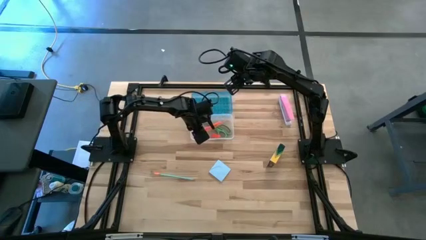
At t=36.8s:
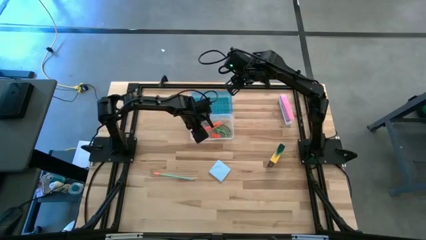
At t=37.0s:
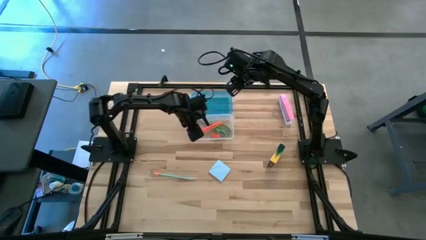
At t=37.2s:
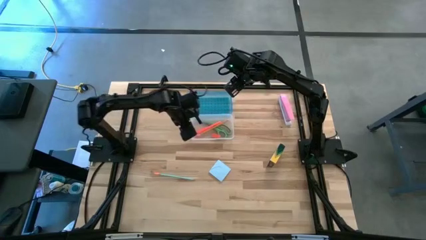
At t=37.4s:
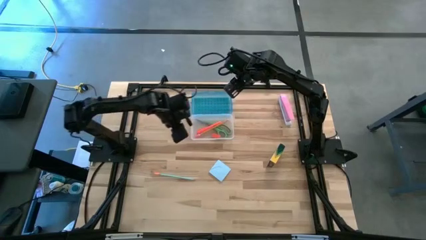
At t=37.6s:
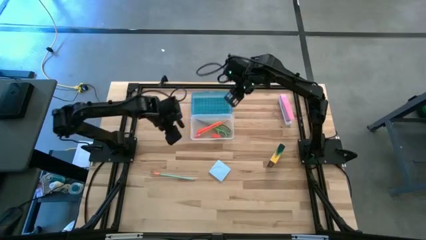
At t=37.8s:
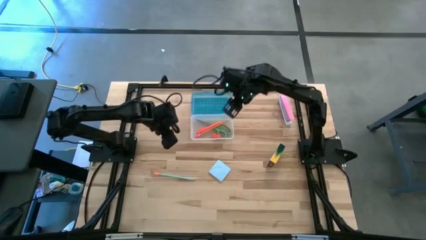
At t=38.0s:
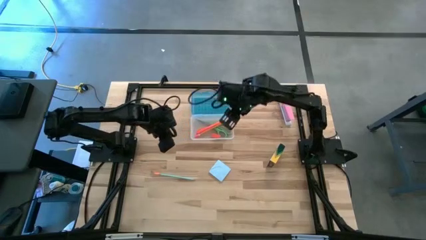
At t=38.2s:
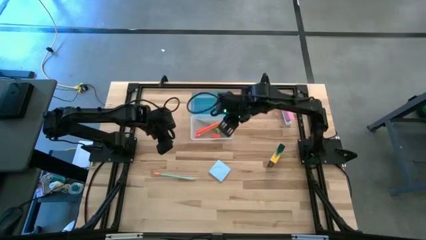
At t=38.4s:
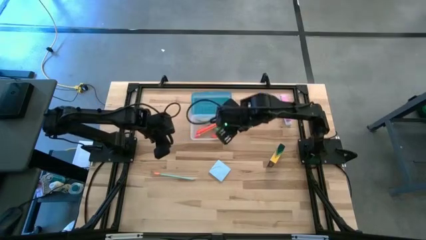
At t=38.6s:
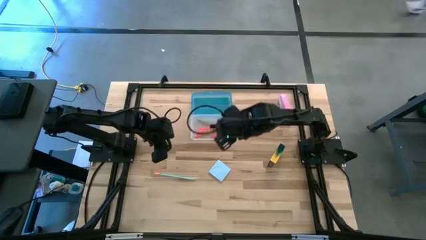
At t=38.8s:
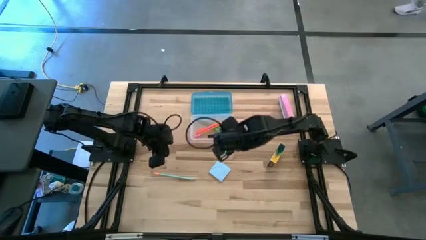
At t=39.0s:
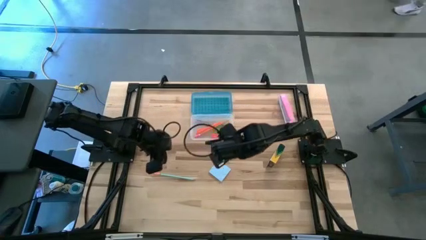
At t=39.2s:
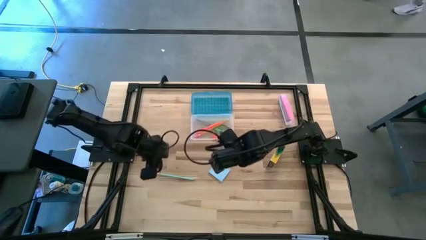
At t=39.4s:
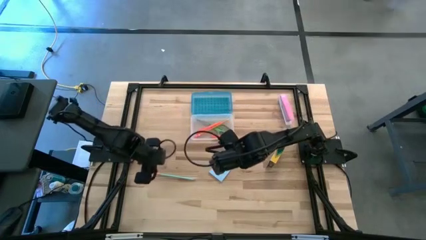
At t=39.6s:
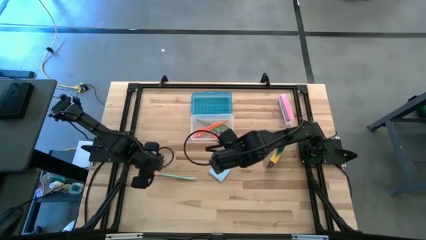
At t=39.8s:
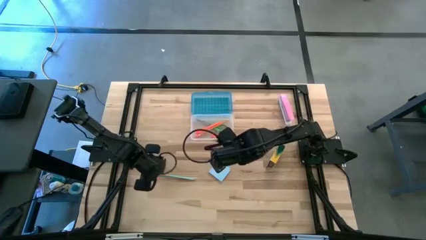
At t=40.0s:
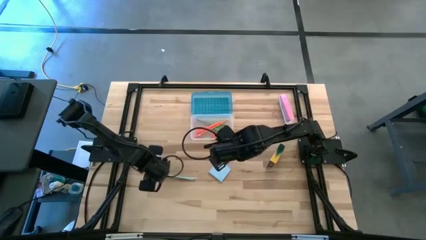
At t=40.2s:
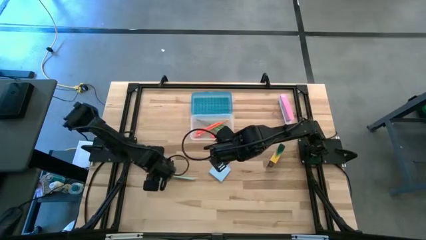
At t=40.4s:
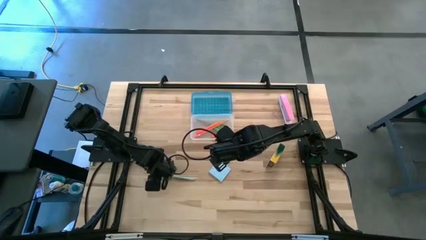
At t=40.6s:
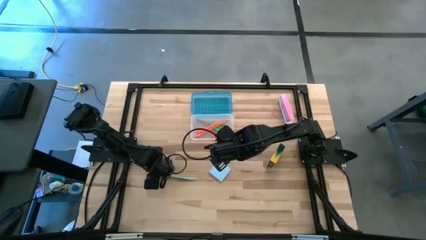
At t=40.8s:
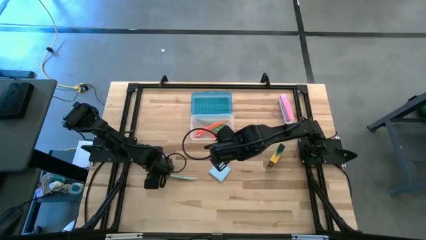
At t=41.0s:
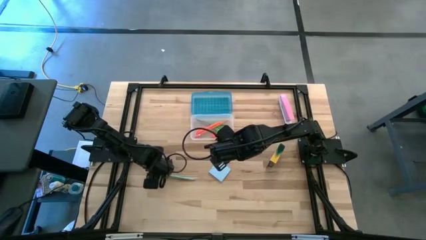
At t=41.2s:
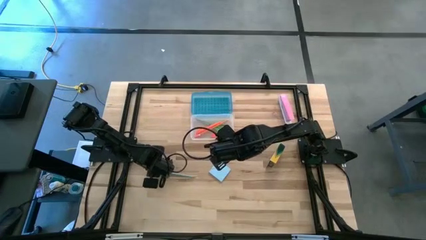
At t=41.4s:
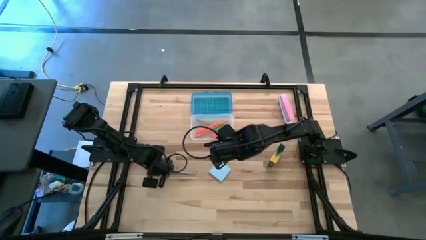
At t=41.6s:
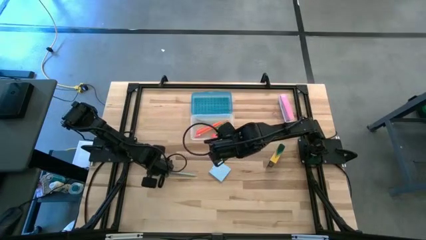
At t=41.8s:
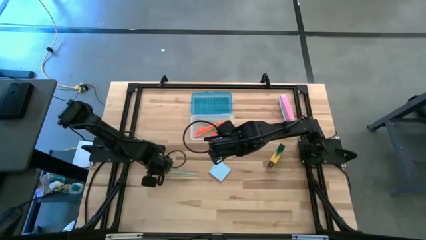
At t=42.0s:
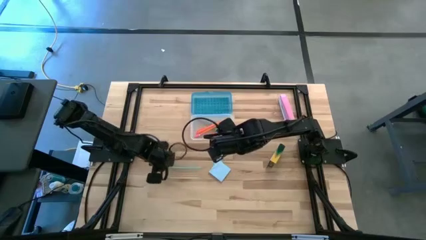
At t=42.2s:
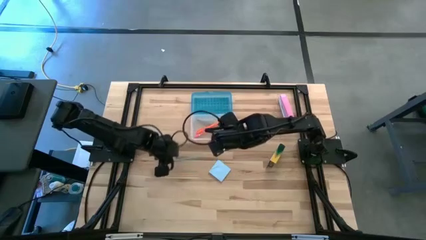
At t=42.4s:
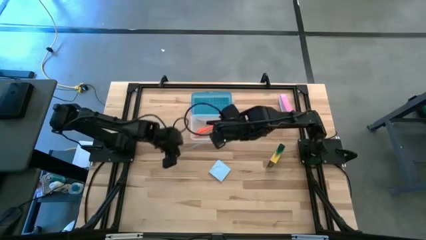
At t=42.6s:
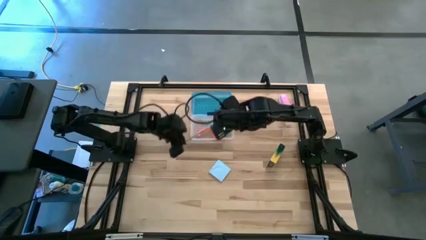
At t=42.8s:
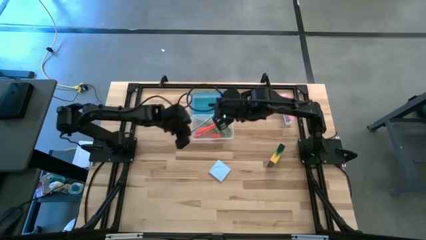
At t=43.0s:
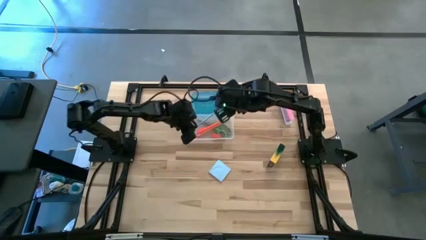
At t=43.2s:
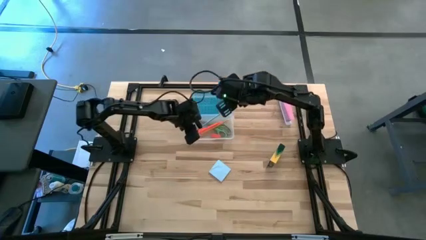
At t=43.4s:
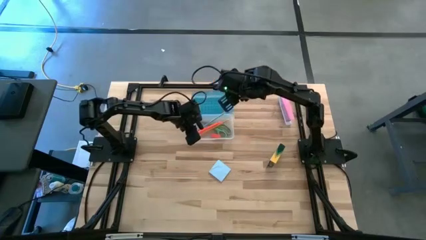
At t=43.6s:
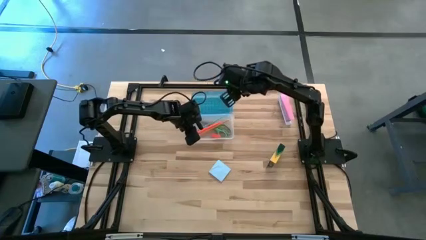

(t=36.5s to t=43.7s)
Task: Pack school essentials
Put the blue pencil into the blue supply box

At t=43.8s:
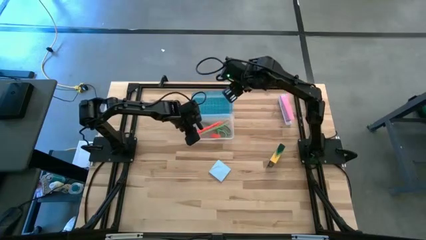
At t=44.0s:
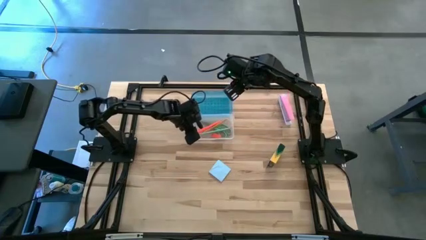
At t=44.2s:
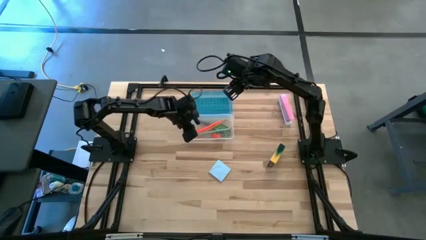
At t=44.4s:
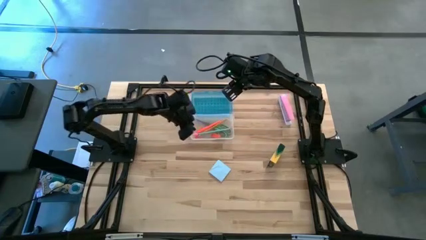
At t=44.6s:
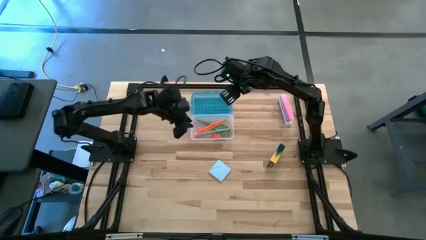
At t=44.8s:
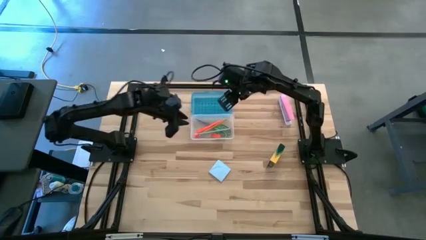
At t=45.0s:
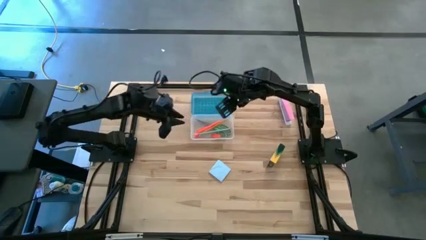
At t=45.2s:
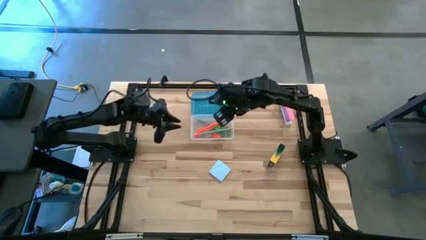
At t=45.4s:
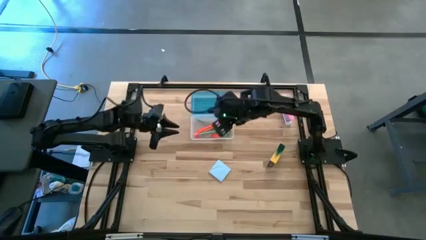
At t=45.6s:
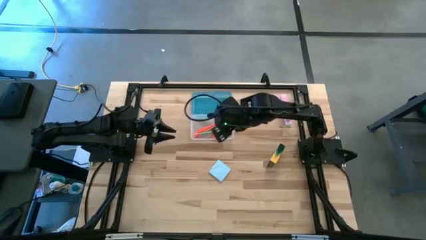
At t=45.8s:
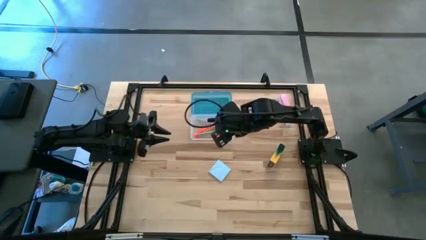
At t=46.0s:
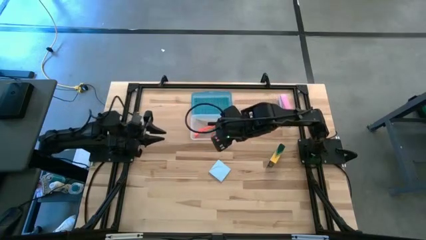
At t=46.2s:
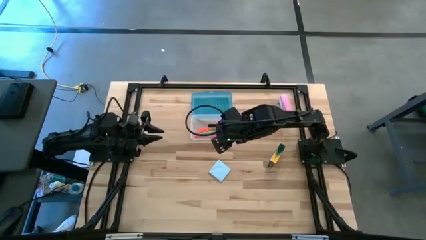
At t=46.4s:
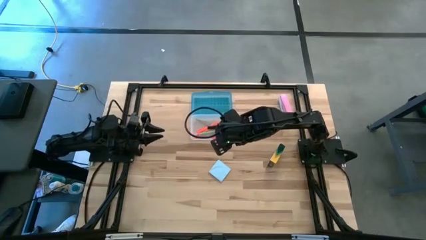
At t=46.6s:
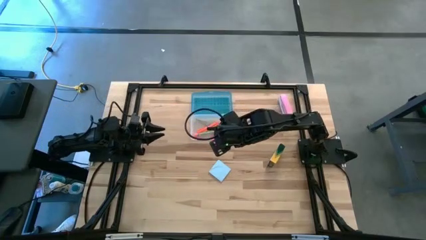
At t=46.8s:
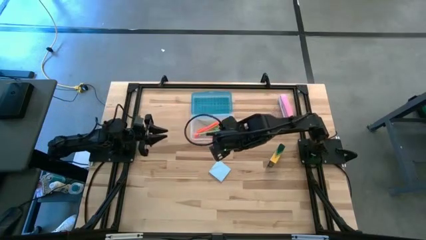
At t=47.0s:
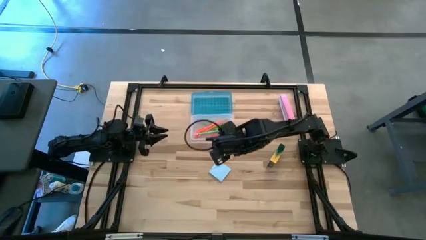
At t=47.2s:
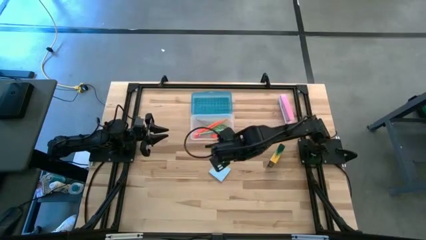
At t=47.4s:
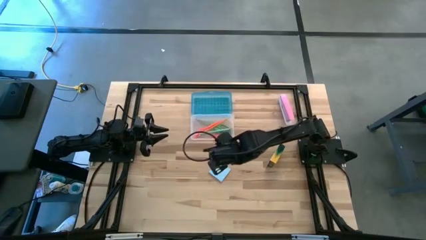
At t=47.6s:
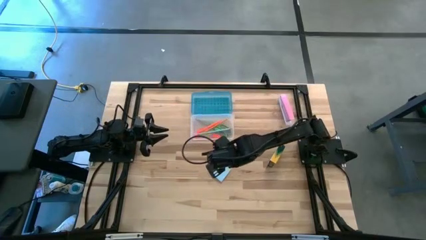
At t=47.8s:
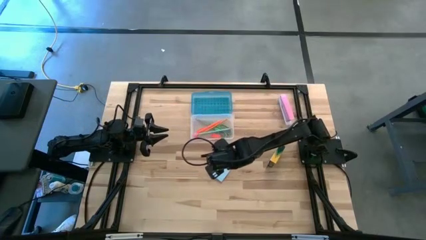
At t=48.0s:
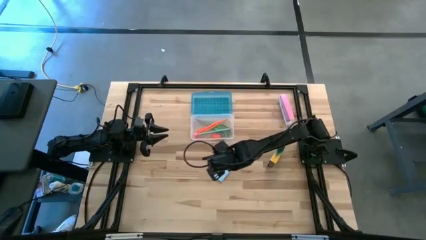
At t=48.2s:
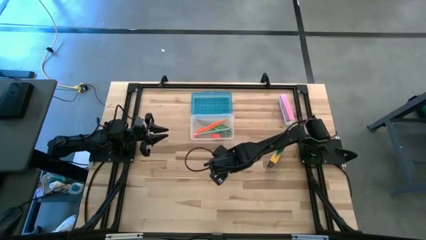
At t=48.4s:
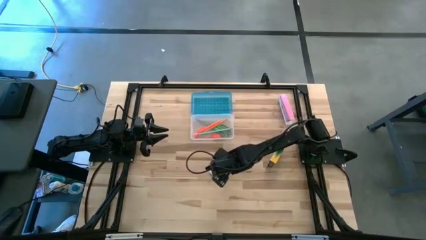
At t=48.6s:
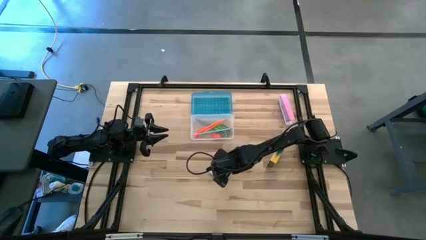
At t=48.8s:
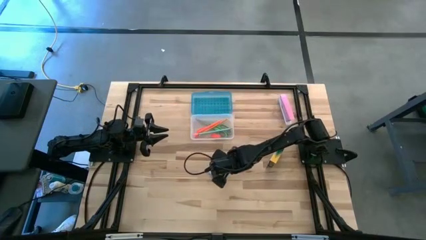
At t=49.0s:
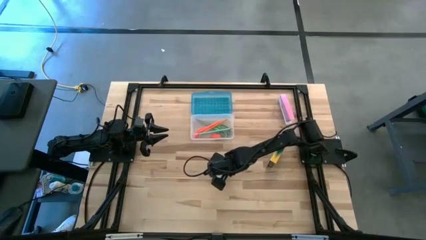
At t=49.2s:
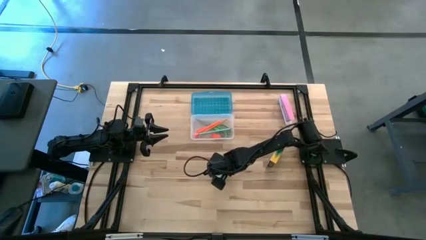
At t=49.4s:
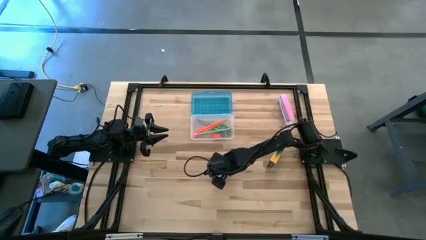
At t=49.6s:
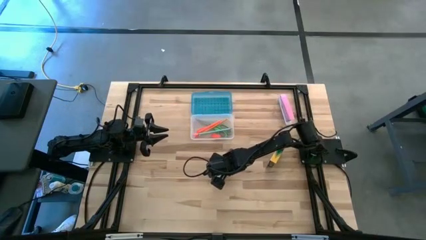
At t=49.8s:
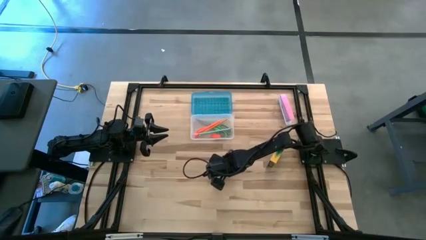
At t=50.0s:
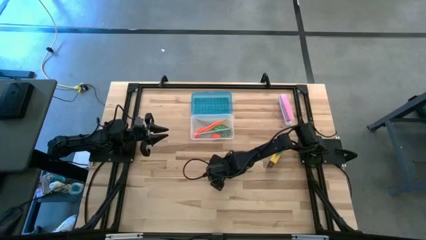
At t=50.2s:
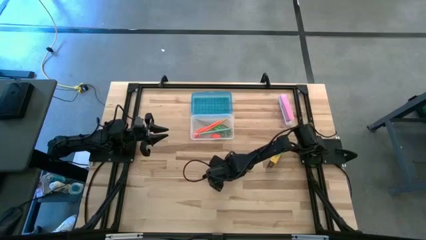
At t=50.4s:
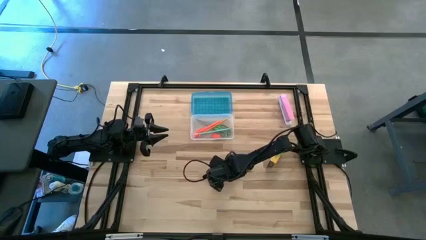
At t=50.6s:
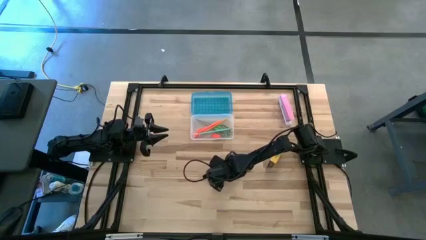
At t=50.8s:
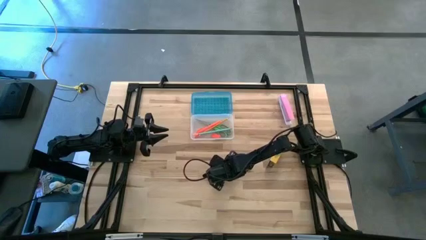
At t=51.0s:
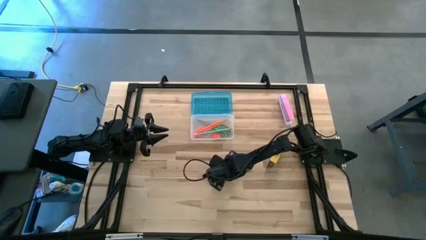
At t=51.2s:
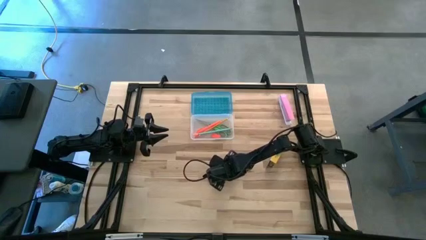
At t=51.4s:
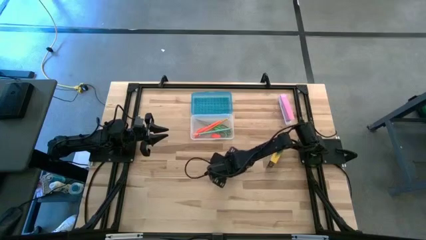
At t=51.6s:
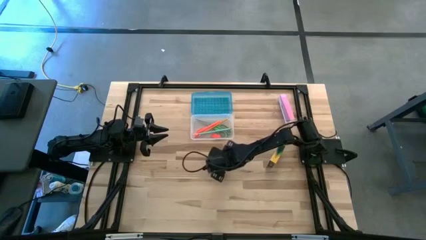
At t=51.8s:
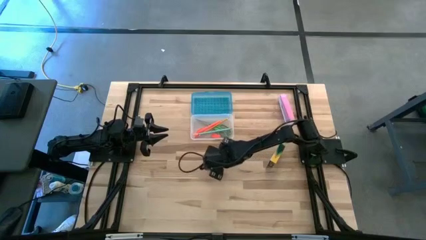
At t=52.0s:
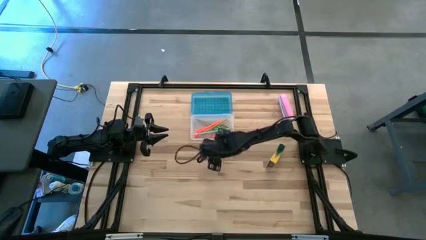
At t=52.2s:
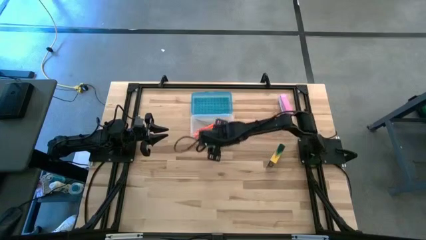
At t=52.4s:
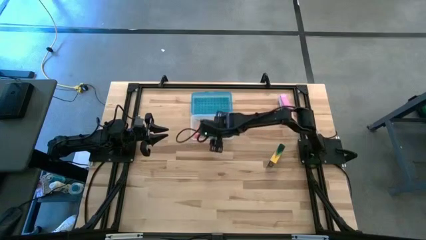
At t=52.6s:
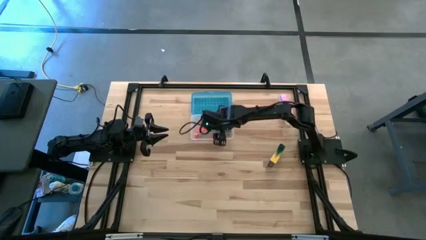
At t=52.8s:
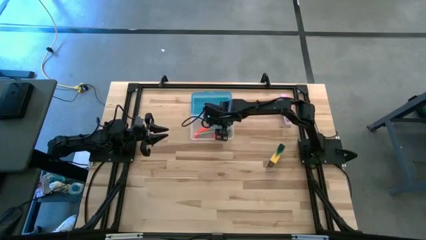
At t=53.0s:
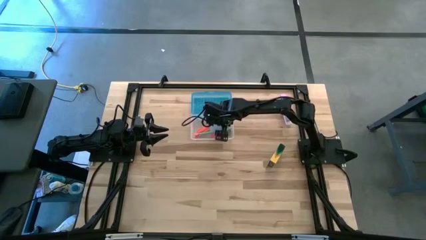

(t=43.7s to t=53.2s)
Put the blue sticky note pad into the blue supply box
